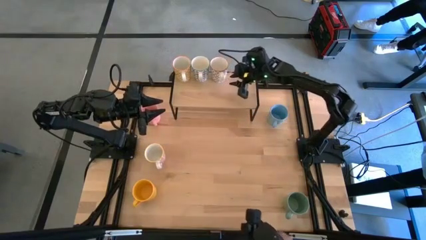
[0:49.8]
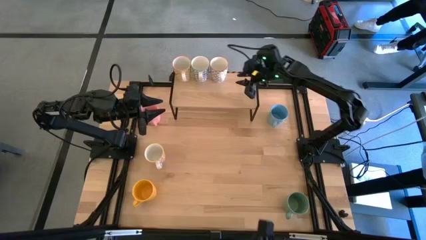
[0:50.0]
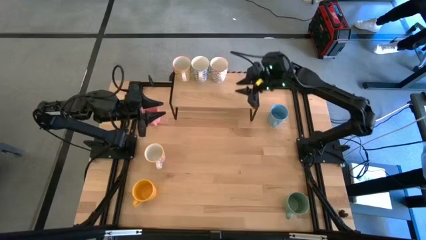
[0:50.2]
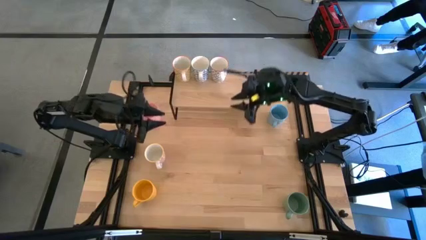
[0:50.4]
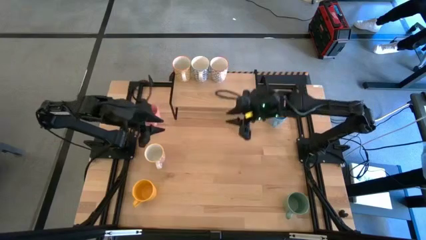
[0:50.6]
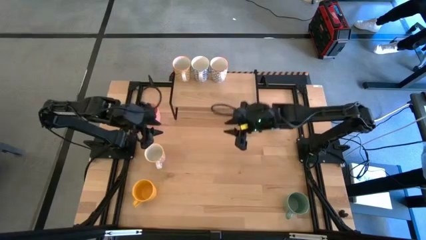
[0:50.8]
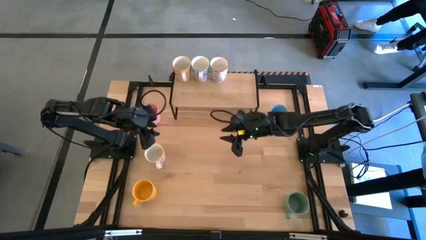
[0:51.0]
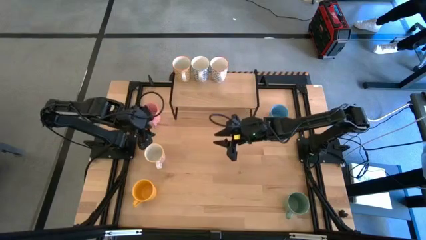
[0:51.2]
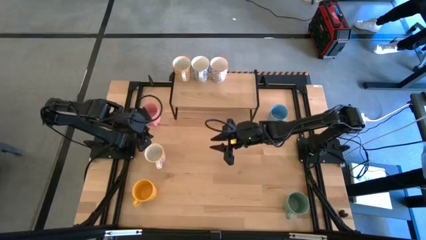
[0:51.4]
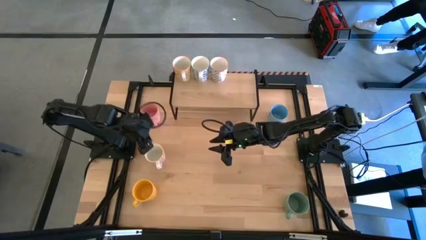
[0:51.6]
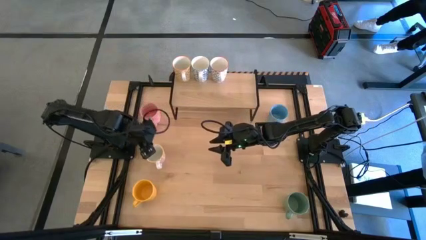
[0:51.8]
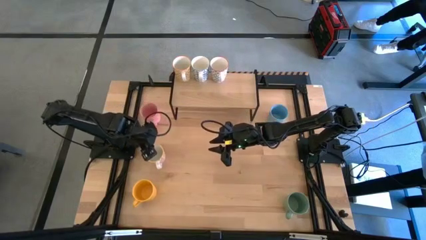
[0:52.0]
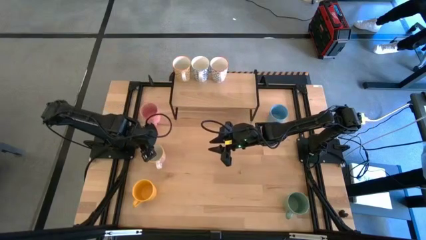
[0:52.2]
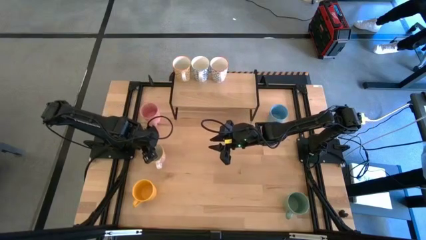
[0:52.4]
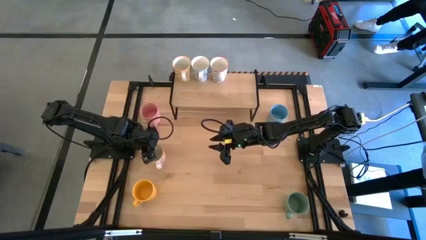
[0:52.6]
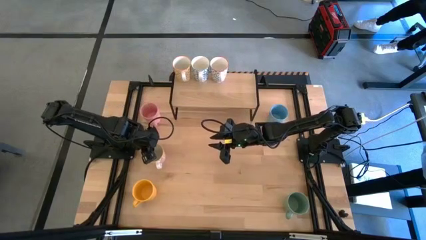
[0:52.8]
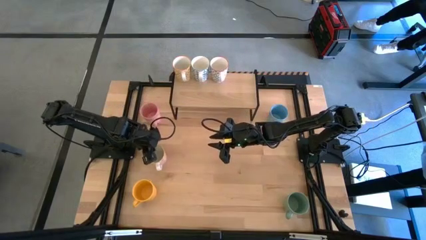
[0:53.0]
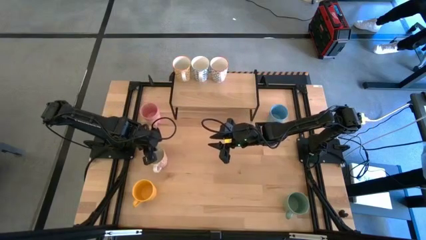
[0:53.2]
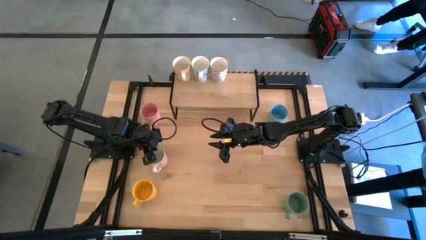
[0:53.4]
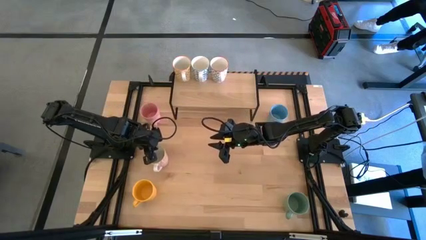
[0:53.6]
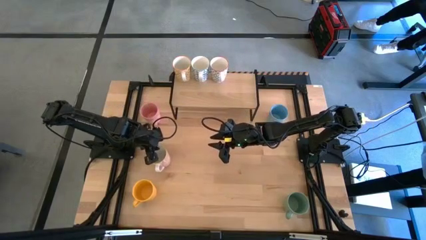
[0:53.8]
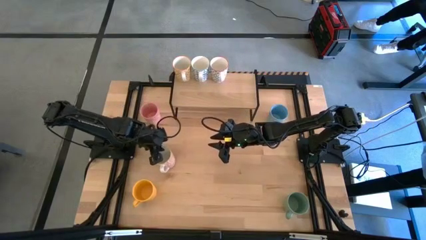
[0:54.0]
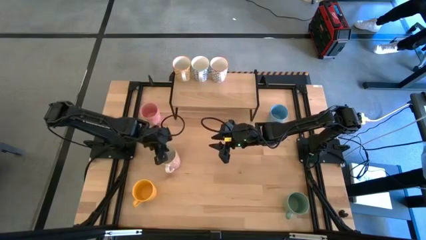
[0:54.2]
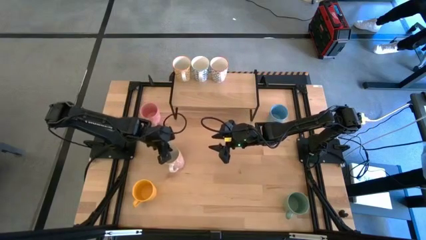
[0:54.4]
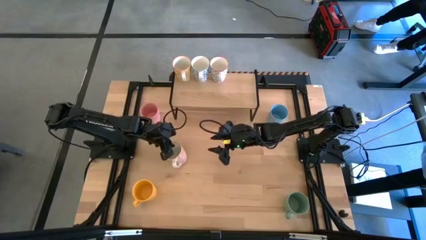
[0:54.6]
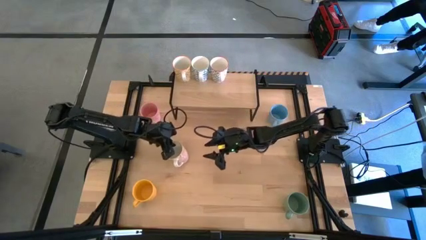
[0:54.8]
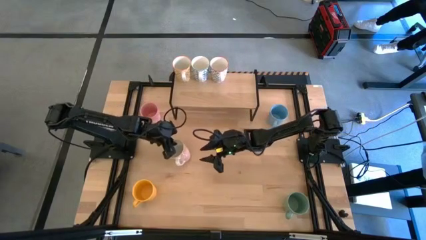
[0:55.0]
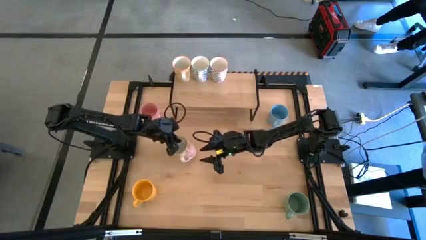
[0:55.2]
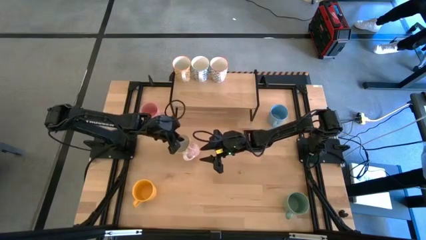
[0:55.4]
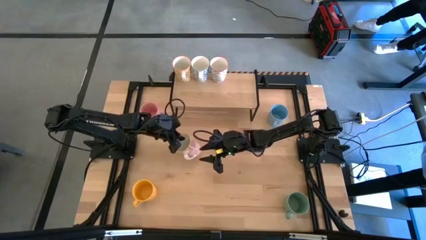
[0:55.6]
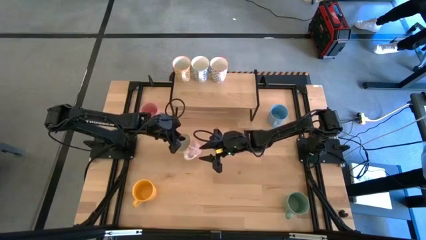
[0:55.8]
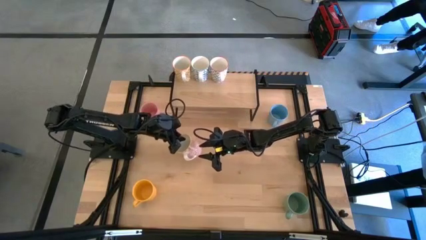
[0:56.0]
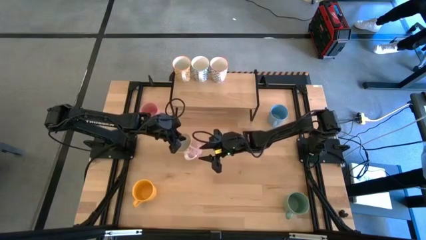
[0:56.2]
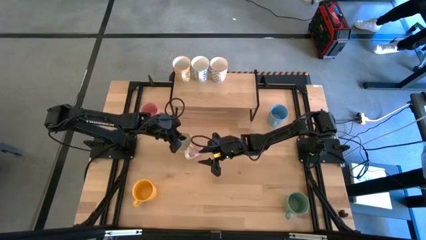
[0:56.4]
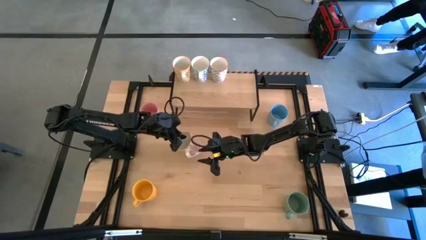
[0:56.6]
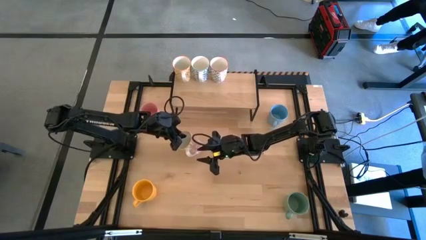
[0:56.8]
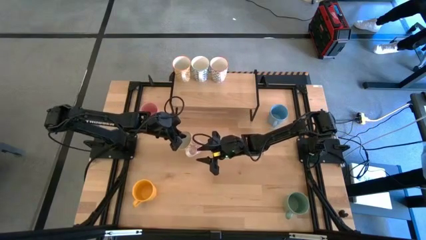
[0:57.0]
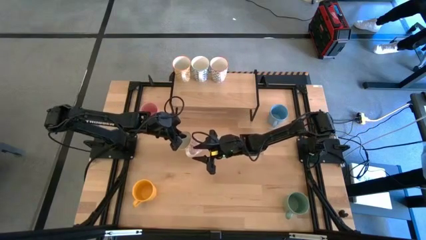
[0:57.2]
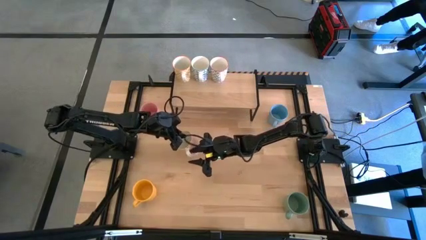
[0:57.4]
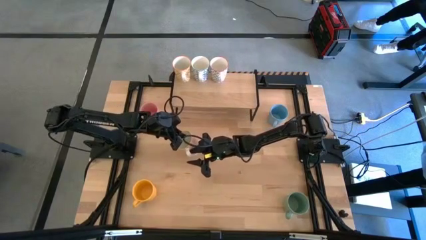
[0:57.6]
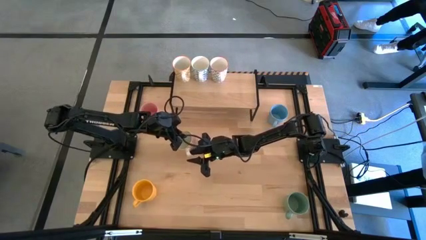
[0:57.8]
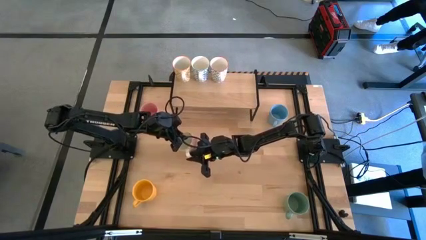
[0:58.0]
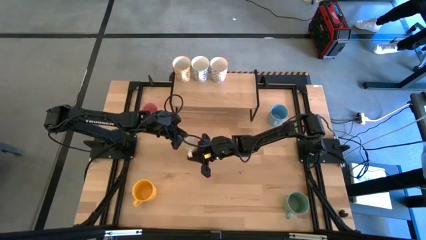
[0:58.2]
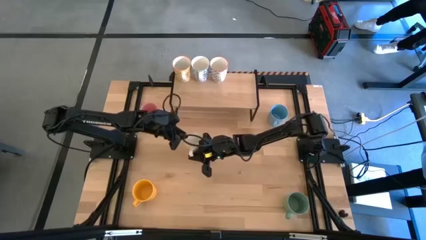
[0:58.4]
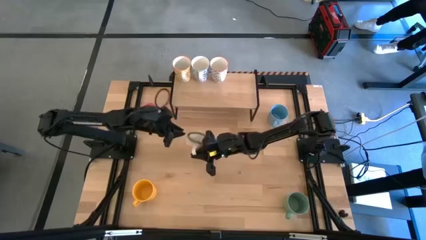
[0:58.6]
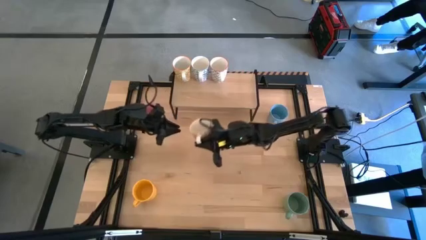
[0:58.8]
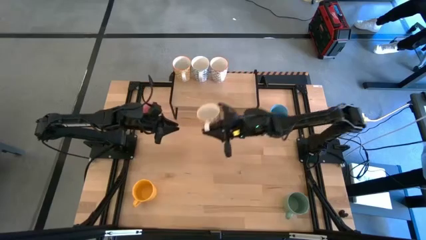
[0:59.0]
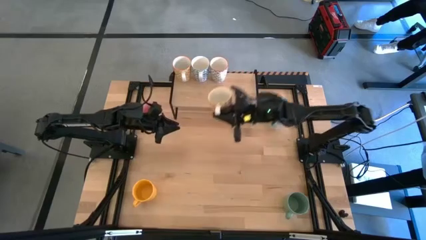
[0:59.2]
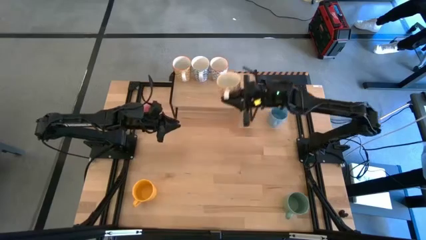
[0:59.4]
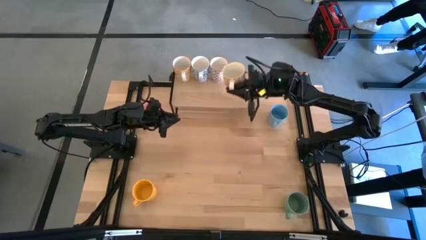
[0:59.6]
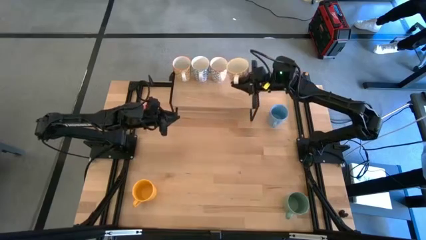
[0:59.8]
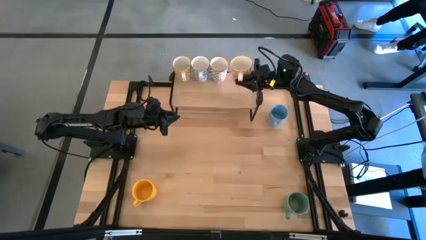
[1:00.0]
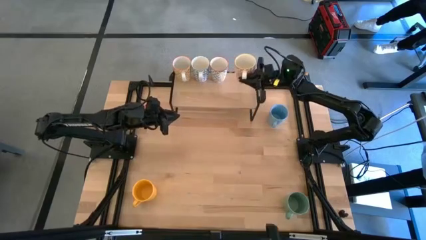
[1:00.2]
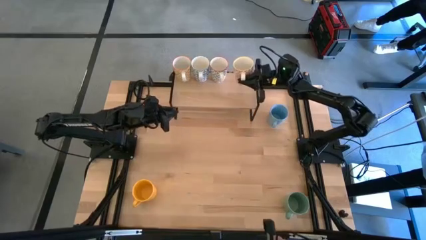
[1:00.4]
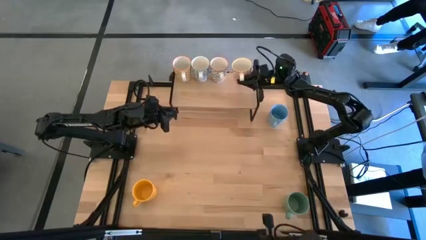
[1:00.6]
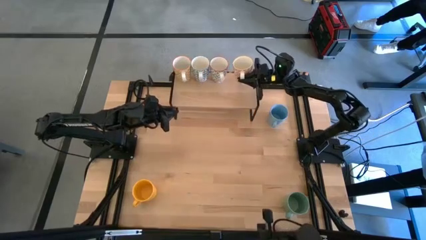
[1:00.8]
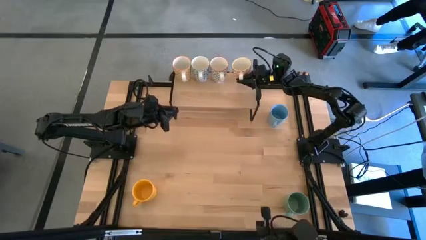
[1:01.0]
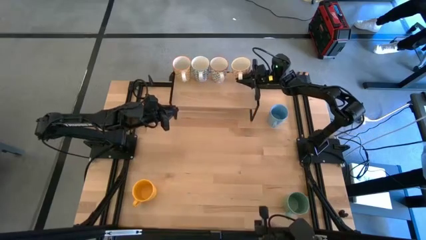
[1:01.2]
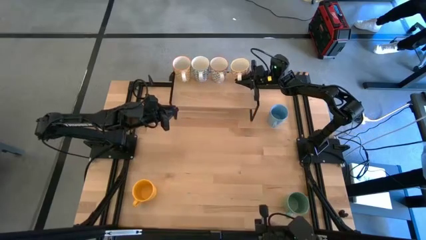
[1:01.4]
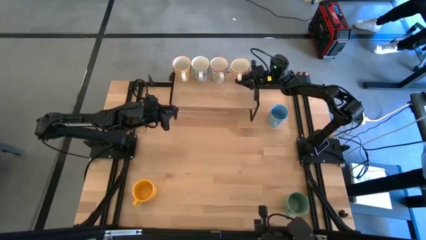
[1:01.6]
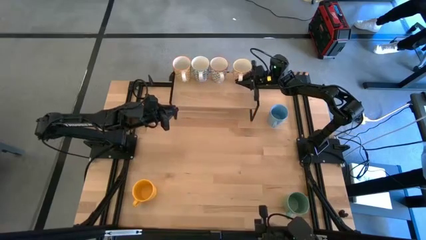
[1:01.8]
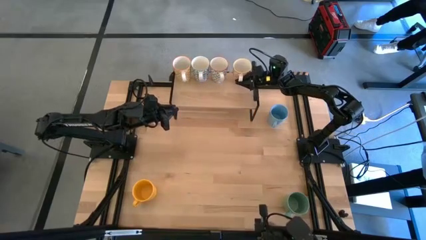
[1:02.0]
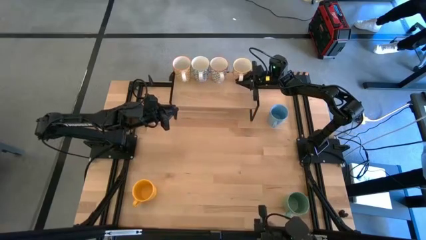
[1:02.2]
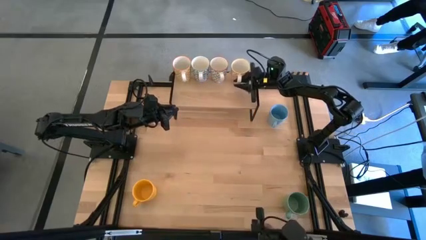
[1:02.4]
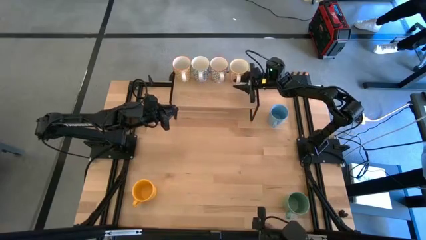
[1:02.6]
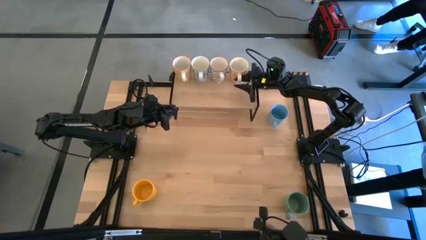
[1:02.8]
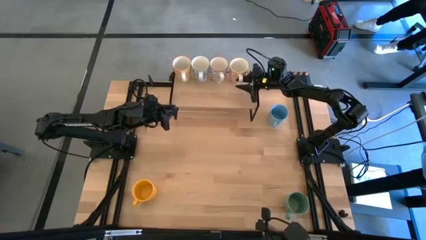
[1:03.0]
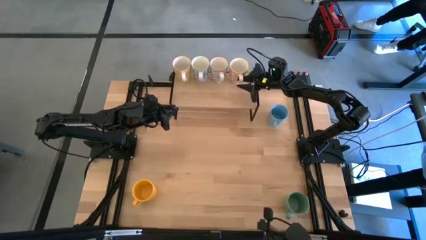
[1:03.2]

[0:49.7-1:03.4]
Task: Place coffee mugs
Put the orange pattern mug on the shelf
